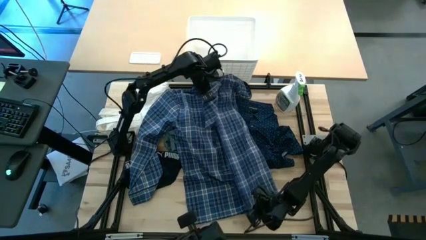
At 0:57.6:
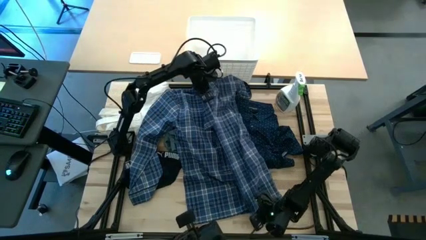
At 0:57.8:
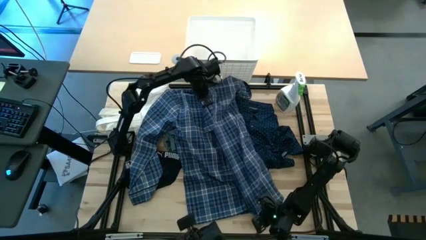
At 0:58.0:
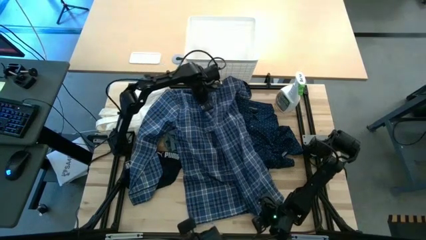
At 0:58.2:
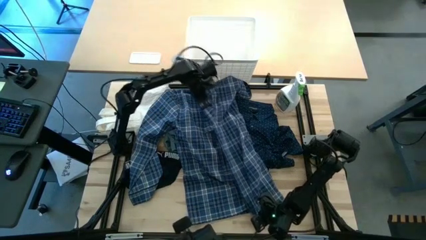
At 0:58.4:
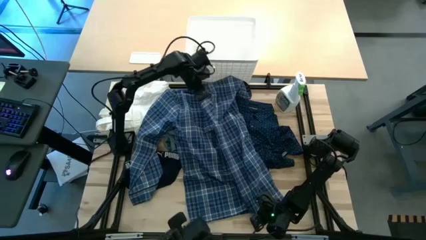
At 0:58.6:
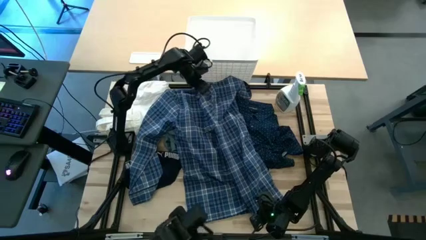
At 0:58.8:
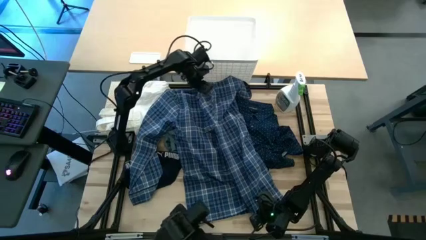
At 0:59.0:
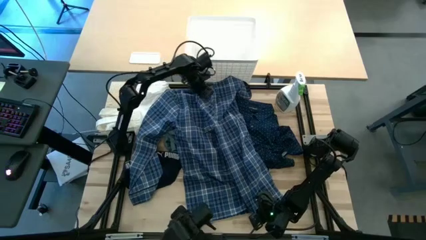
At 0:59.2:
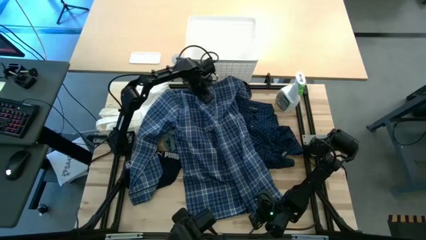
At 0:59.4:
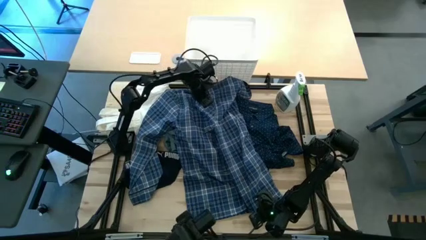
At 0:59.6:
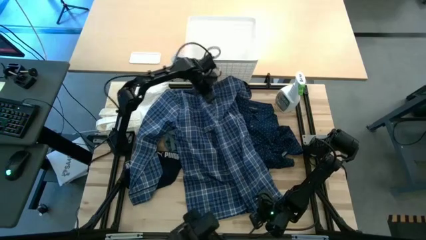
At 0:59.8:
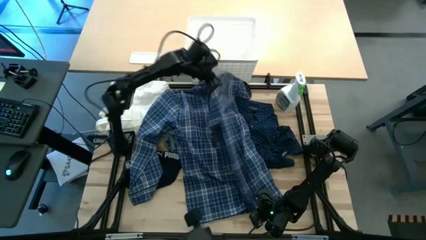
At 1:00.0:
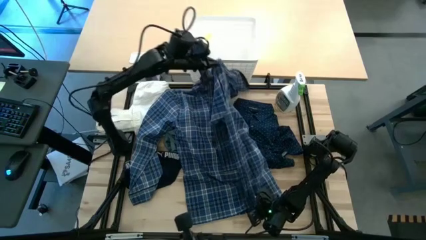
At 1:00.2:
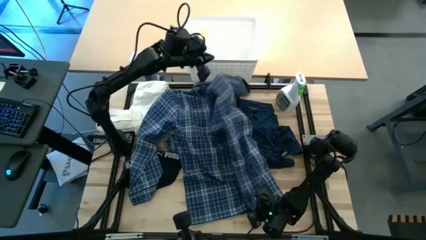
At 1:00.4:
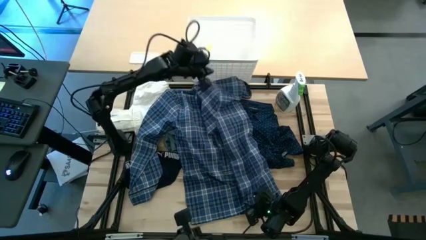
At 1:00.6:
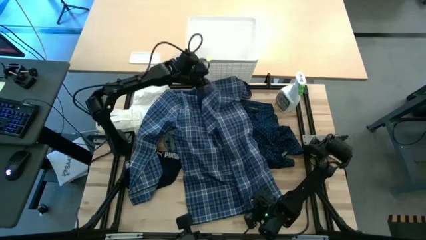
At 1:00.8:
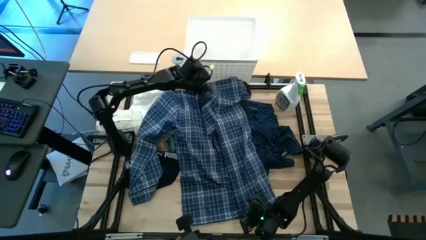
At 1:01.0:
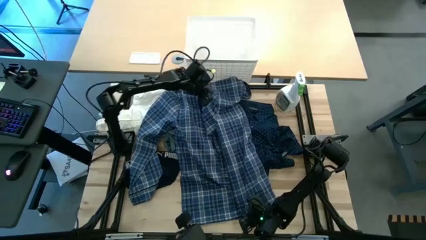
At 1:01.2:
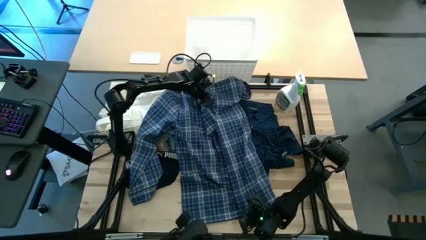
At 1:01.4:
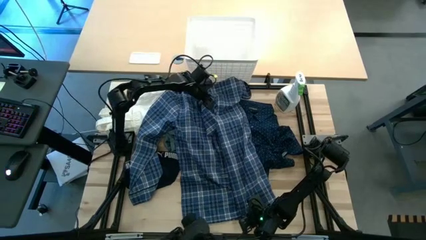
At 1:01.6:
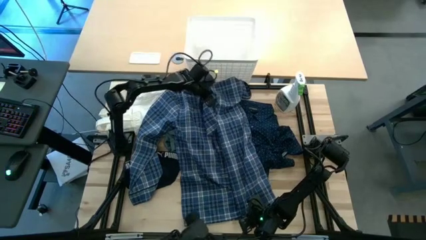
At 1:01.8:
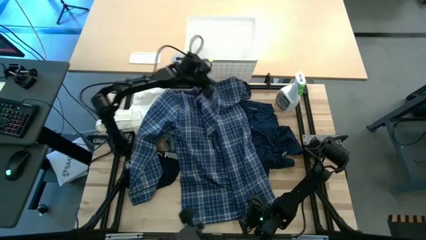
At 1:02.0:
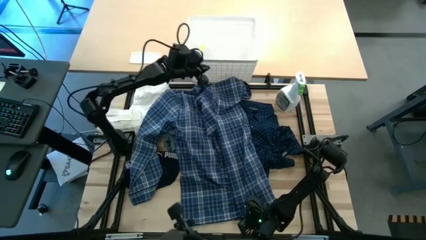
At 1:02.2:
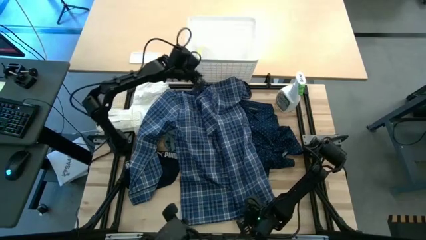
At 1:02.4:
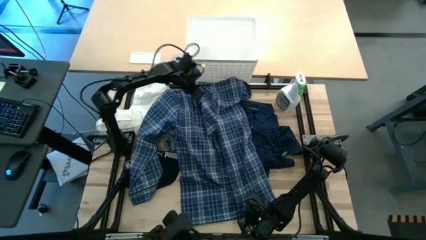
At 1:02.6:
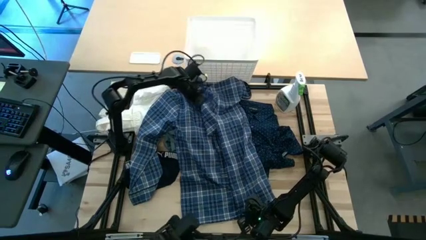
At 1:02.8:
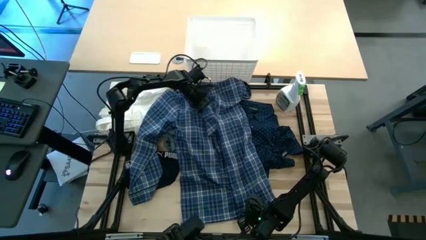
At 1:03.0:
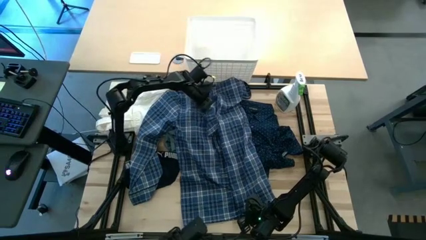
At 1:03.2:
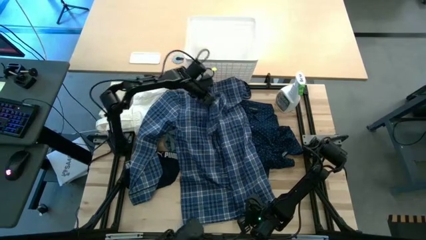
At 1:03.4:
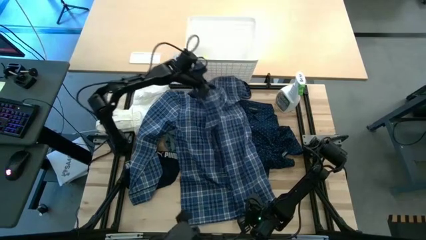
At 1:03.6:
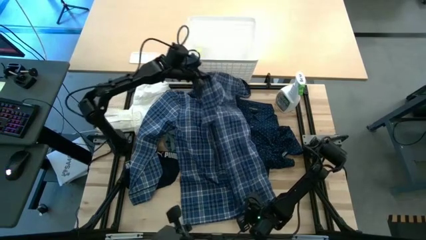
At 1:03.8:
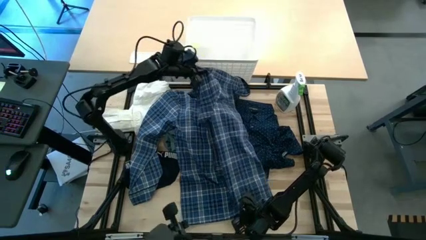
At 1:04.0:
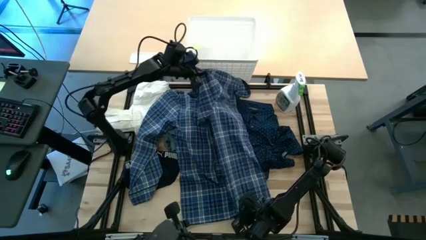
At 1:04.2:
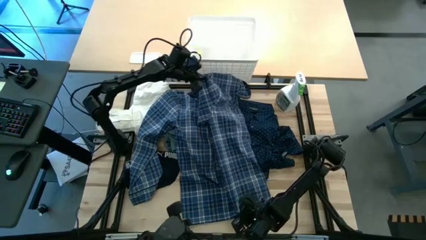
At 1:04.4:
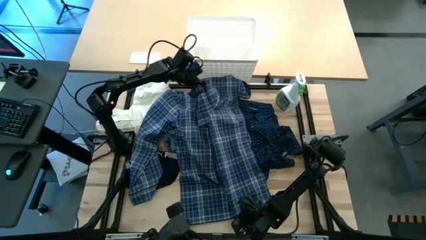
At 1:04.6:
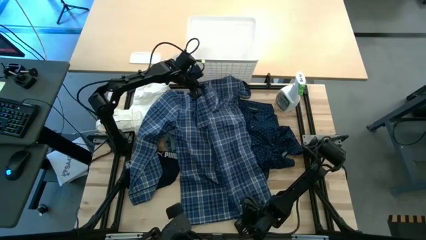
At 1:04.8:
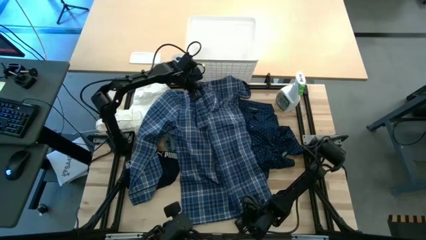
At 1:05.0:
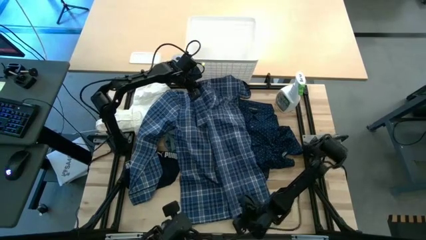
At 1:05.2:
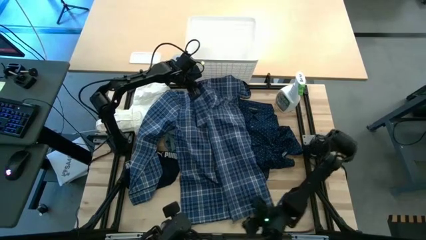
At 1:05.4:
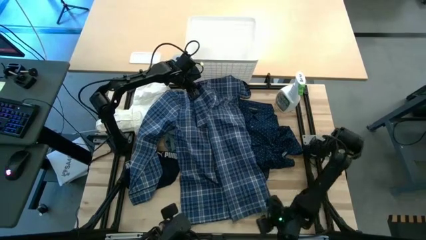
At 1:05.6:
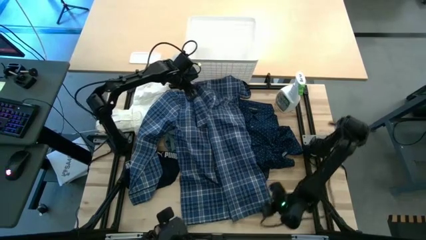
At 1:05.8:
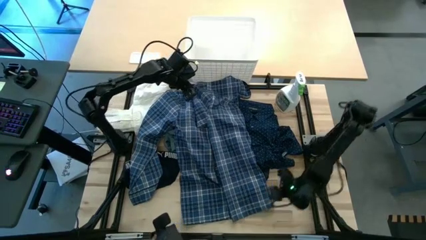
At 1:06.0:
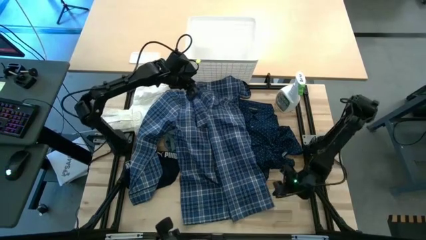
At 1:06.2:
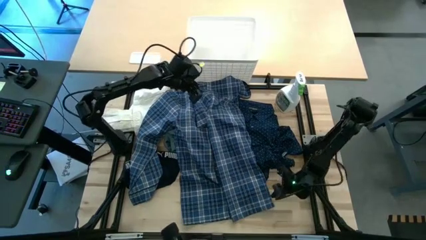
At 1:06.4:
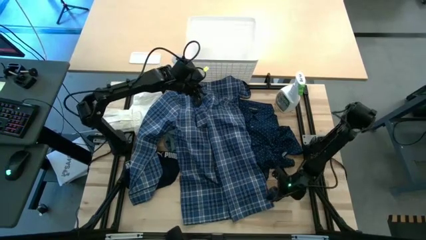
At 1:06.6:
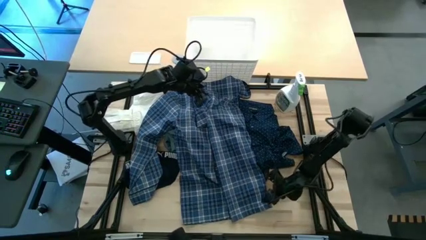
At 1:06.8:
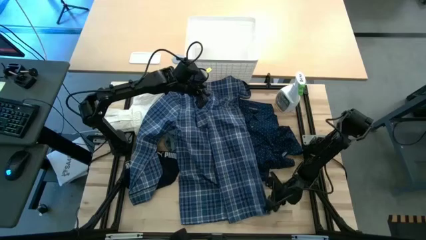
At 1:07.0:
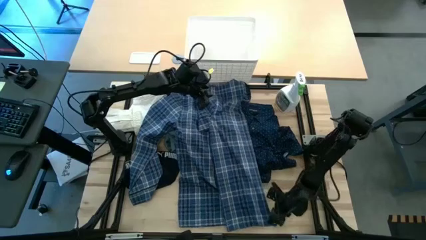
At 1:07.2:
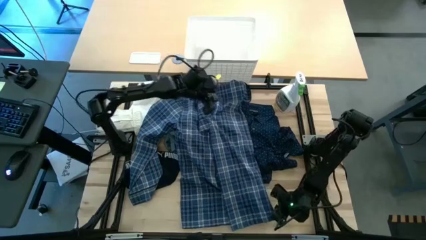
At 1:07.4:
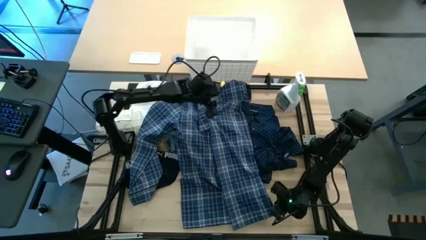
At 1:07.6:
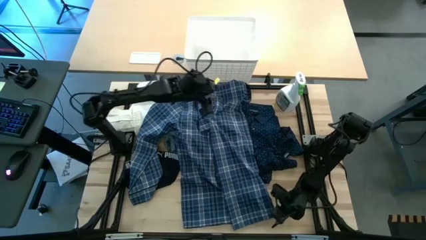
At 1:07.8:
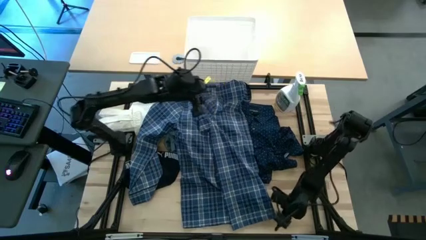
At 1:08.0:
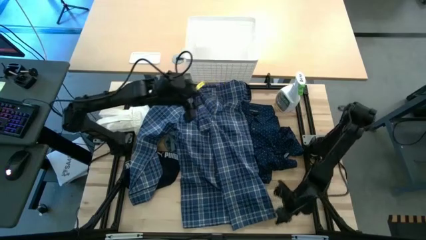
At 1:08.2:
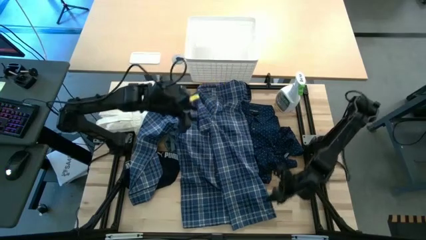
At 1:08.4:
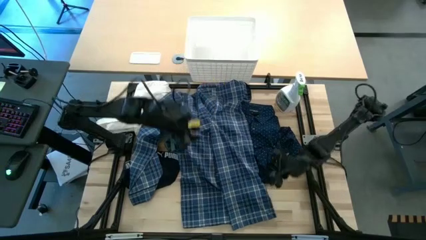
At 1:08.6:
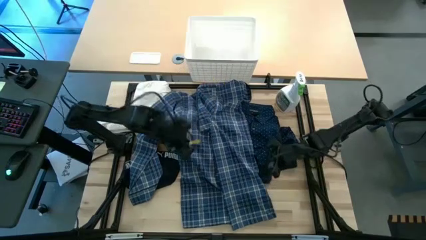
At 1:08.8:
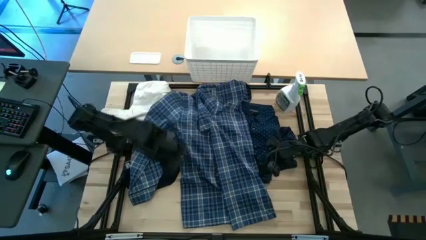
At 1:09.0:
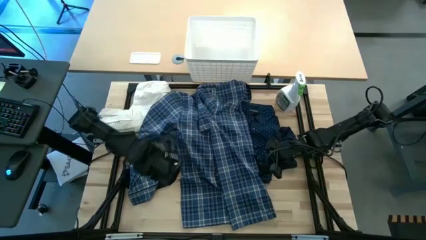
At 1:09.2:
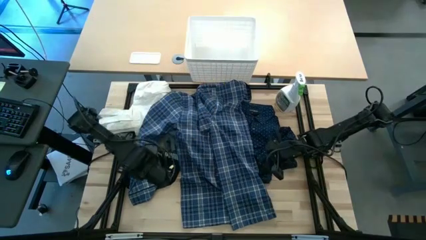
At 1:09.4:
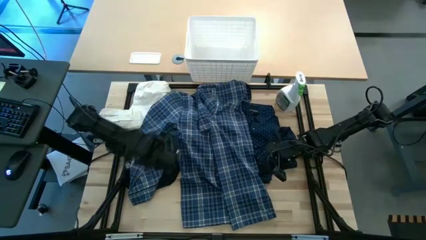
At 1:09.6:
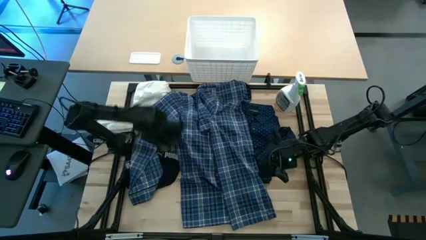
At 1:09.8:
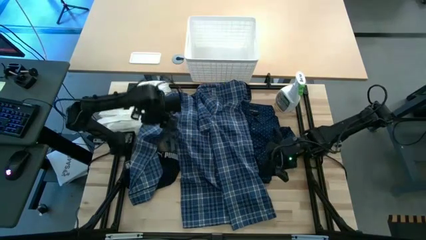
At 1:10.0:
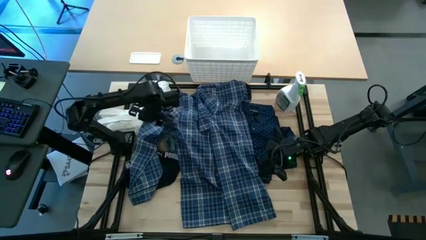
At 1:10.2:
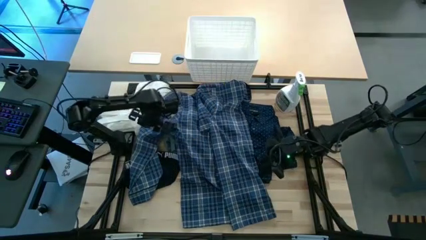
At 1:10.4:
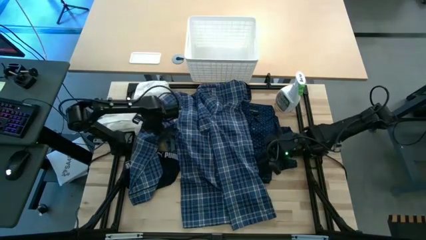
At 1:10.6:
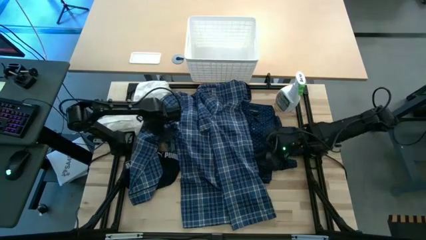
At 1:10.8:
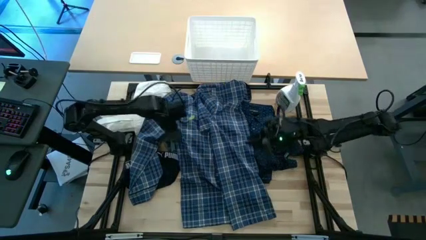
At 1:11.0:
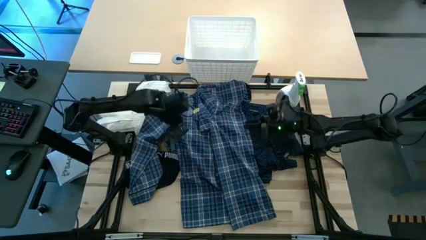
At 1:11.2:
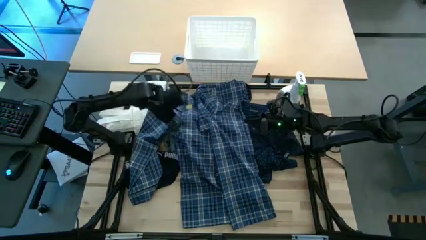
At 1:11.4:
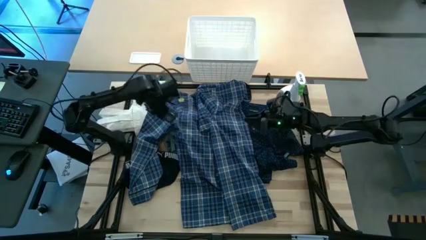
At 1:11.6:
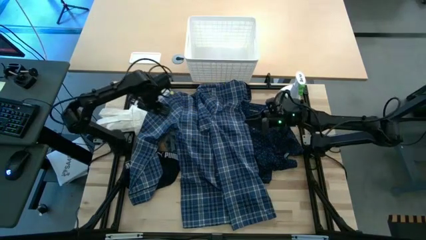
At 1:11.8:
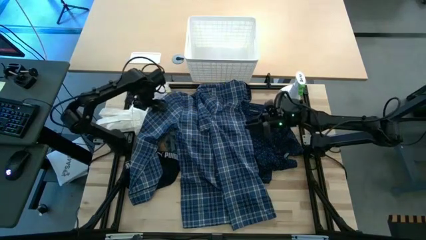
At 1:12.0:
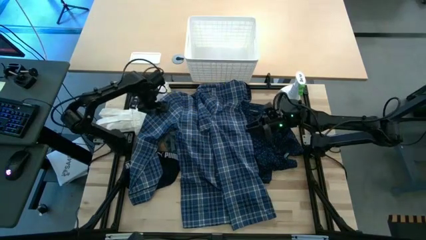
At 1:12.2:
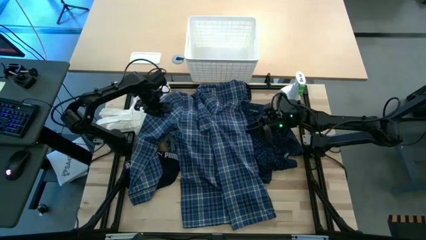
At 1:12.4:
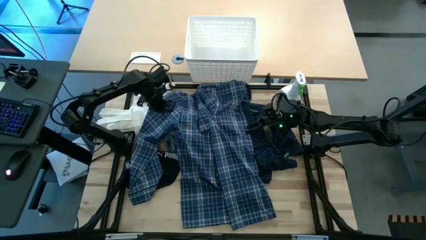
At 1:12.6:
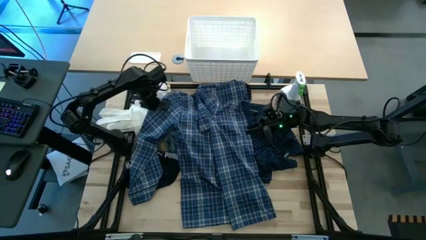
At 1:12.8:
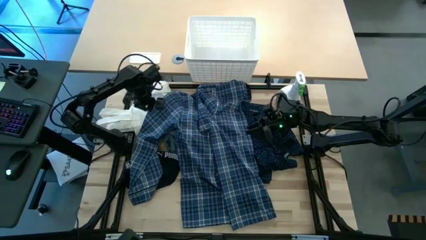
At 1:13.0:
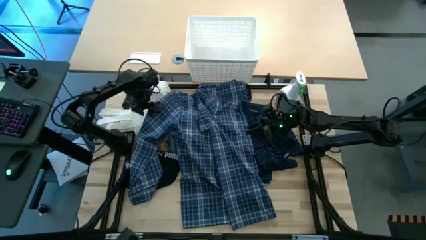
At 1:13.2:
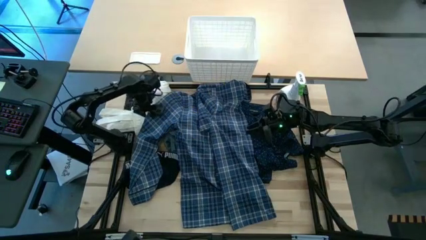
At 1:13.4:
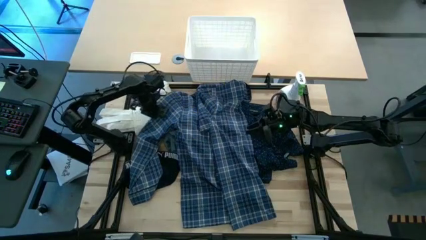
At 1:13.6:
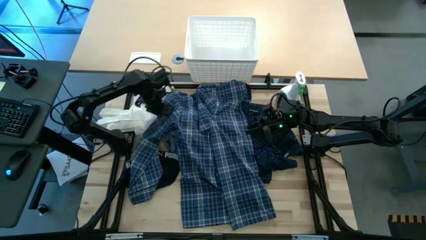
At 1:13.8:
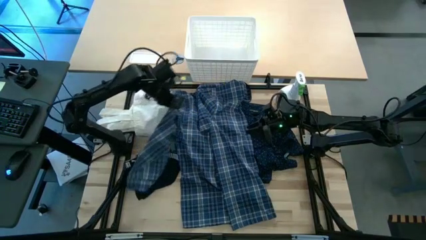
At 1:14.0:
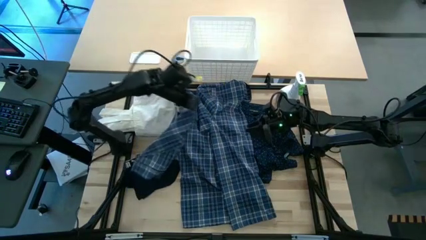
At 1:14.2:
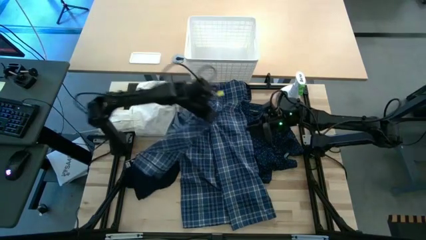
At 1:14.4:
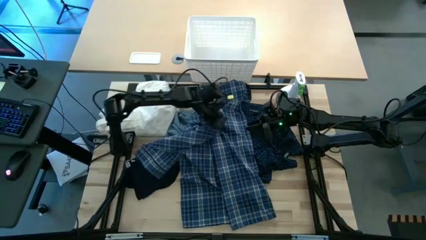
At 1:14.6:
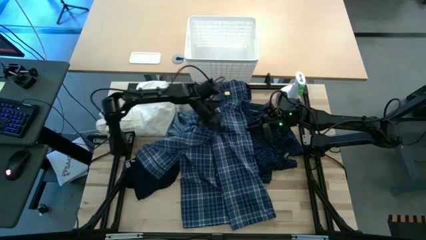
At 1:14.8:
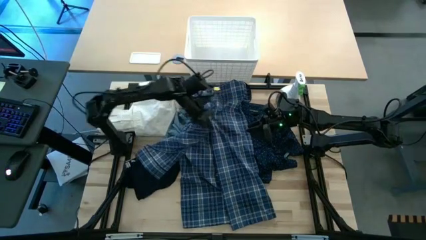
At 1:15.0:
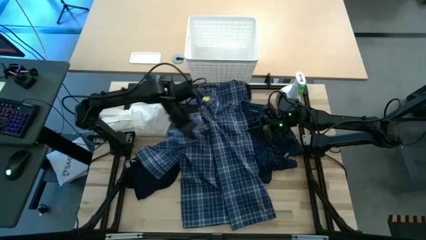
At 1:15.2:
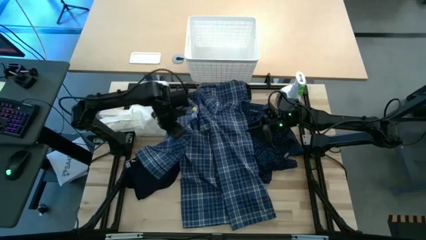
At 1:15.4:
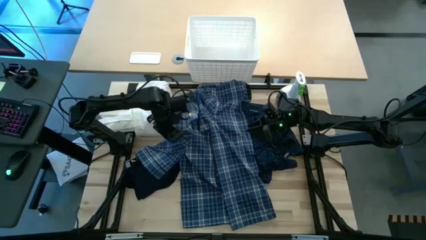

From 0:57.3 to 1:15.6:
Fold the checkered blue polo
